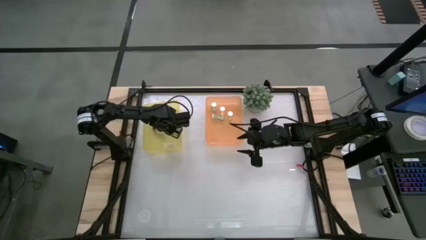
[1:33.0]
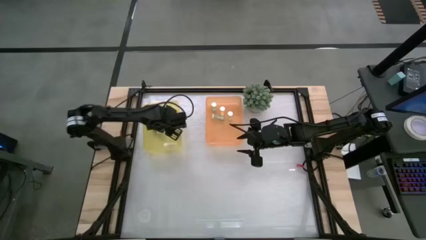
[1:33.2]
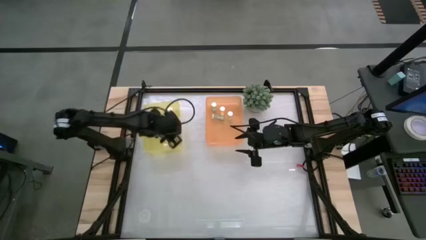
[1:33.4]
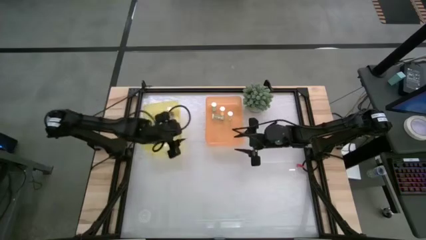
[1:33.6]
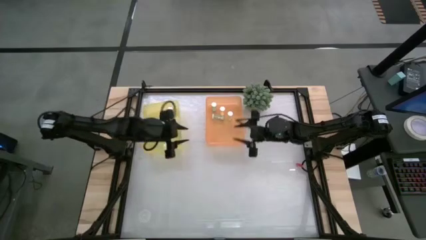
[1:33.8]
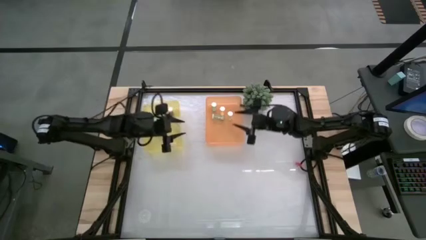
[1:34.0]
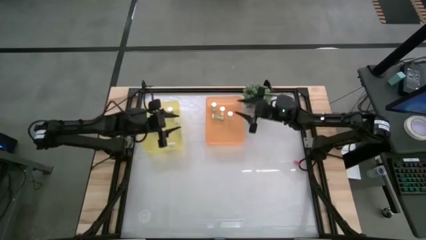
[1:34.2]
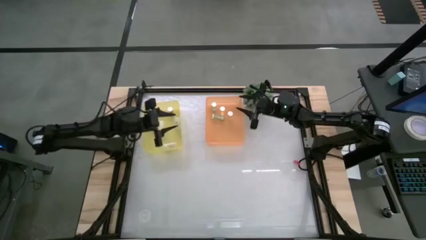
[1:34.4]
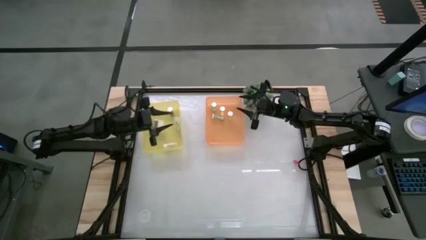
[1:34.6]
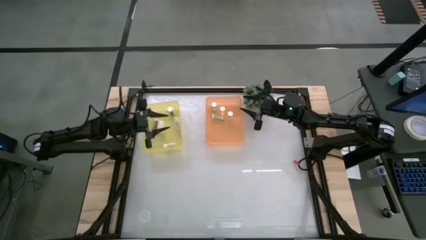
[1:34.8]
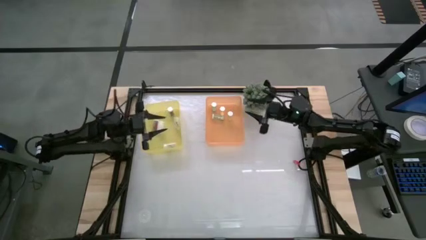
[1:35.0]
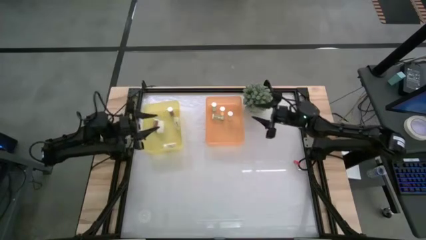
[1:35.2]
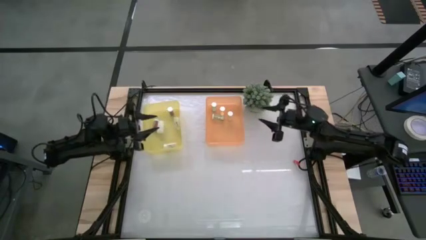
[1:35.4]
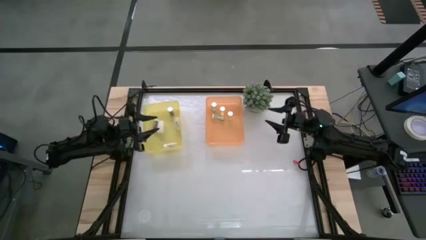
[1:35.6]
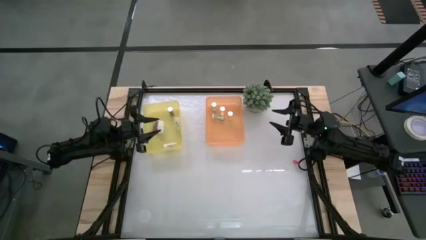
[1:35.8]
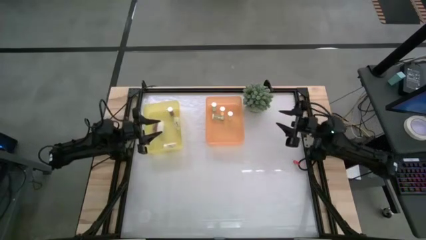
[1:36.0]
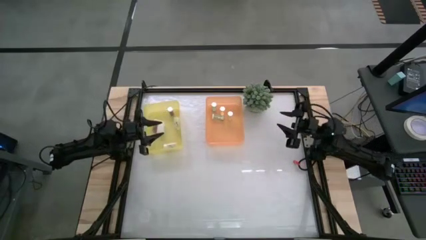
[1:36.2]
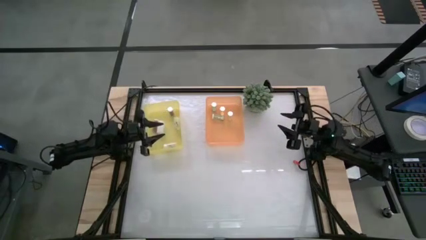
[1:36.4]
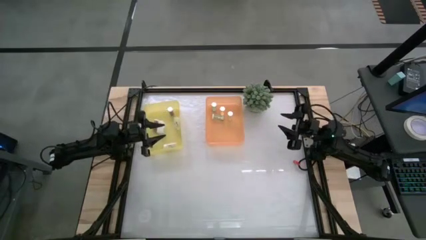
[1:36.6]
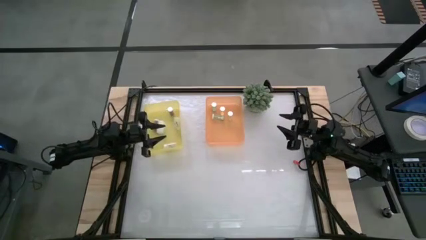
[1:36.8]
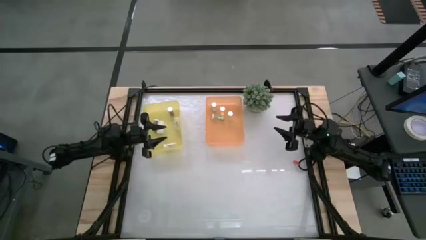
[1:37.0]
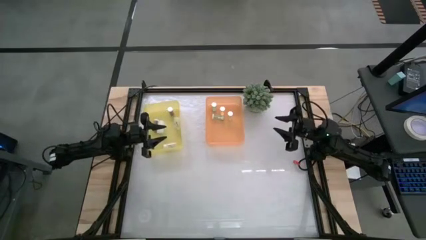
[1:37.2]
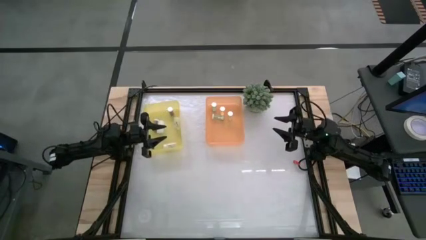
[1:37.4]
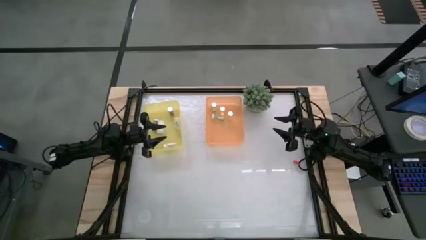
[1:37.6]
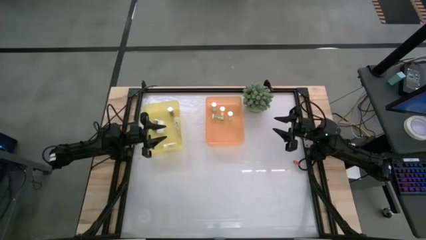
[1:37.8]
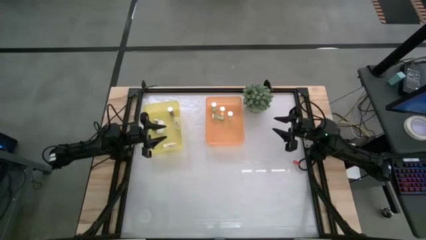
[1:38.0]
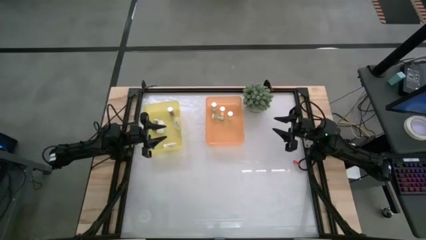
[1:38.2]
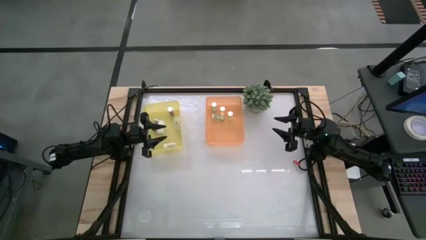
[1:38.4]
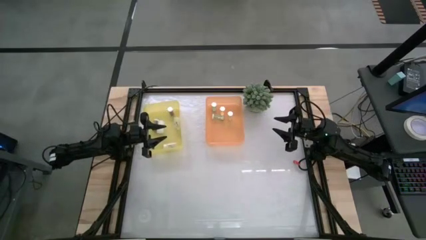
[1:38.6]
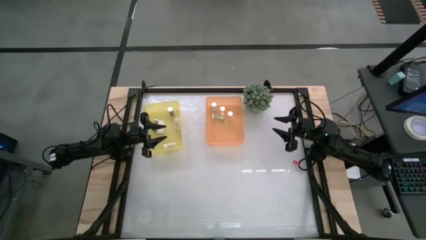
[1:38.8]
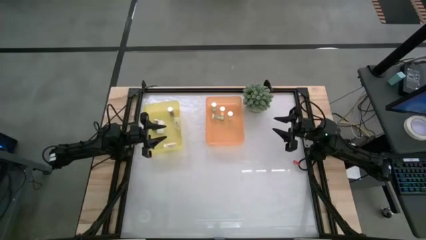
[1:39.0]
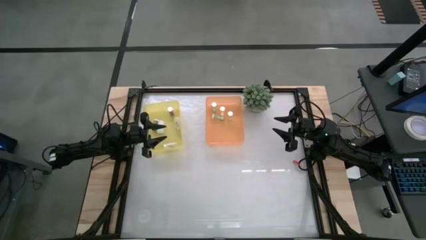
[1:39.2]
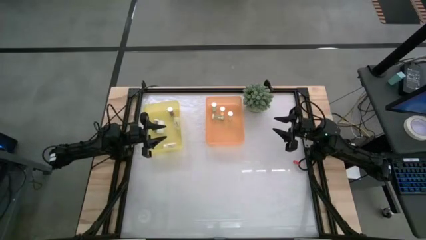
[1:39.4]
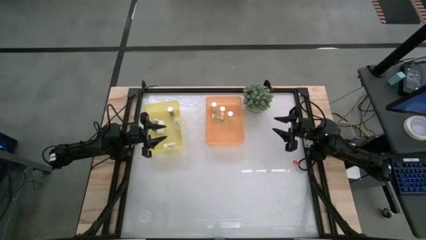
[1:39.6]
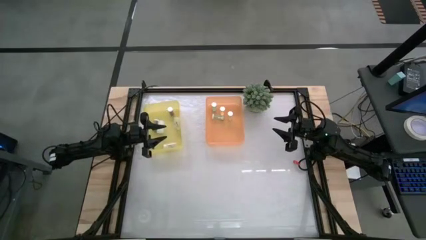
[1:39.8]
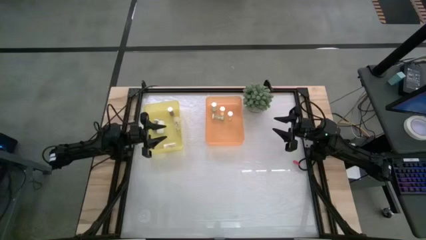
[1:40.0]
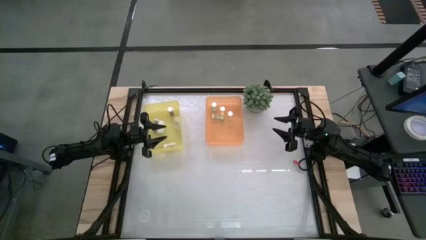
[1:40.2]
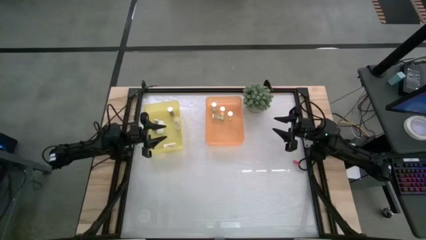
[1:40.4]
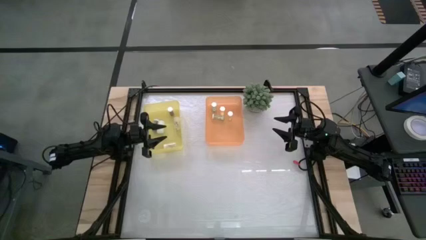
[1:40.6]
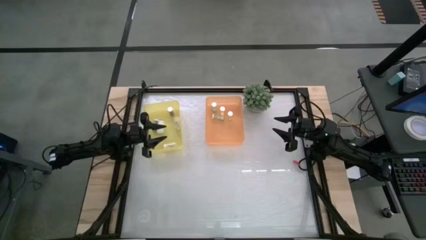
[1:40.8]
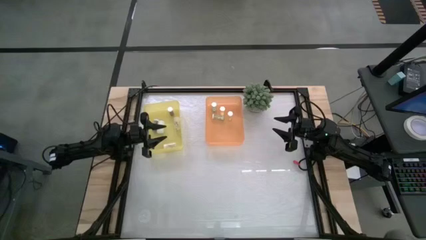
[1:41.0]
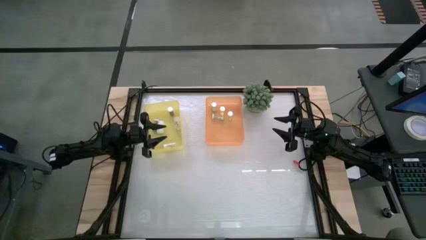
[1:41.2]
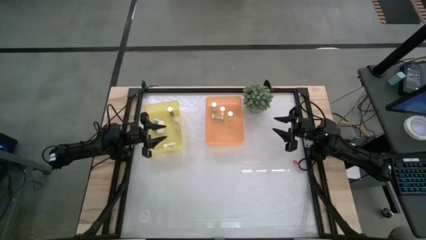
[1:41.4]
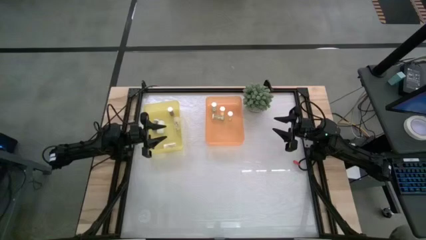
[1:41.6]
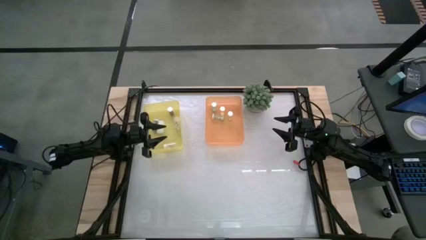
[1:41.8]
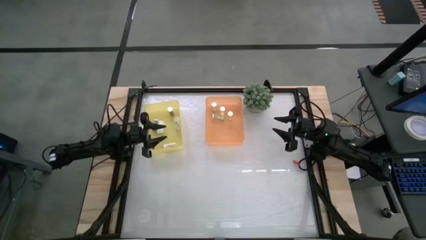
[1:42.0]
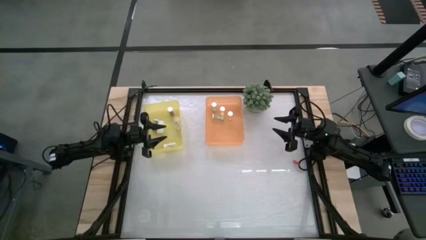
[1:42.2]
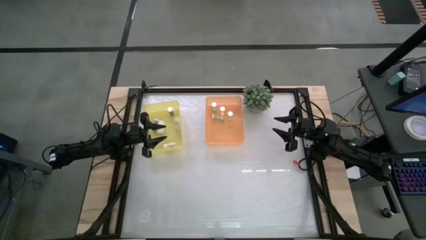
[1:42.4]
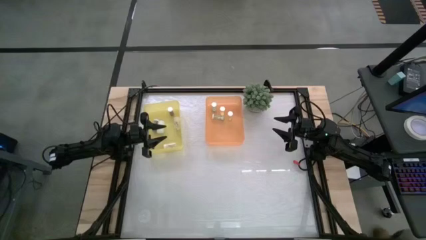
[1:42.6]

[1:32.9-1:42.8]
Task: Pick and place medicine bottles into bin by pill shape (circle, oval)
Return to Home Position

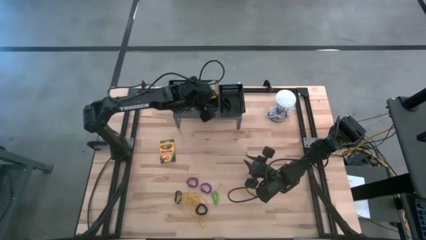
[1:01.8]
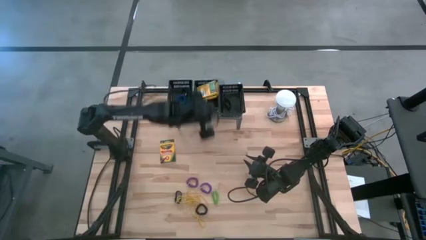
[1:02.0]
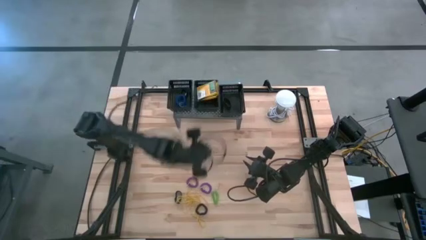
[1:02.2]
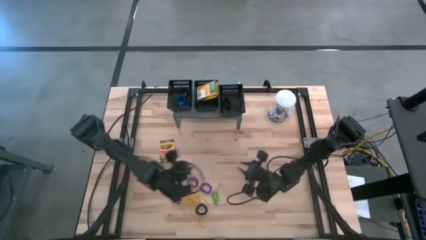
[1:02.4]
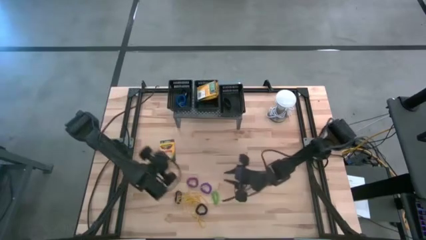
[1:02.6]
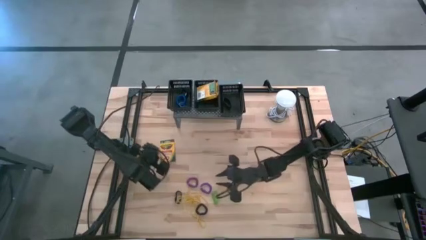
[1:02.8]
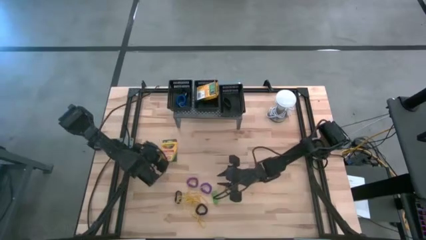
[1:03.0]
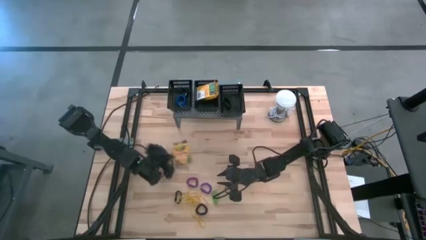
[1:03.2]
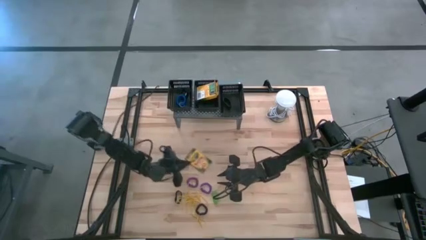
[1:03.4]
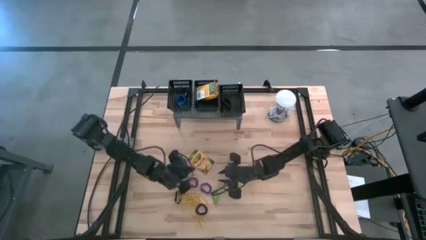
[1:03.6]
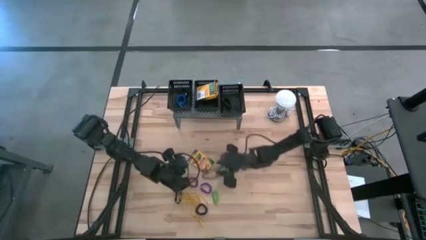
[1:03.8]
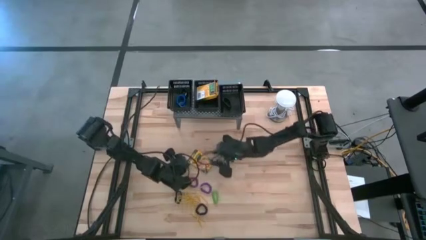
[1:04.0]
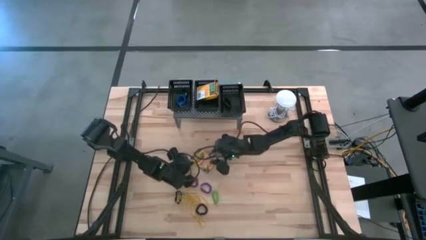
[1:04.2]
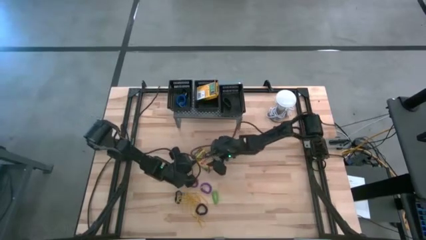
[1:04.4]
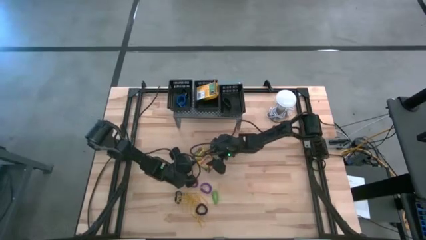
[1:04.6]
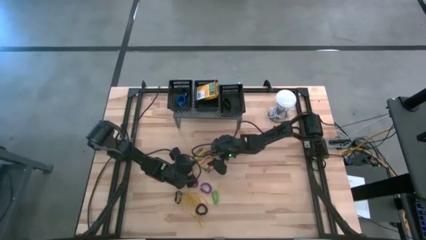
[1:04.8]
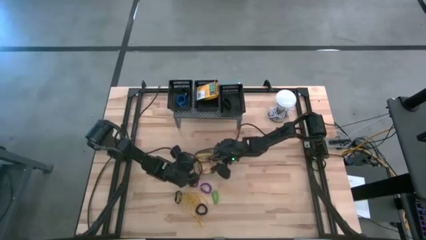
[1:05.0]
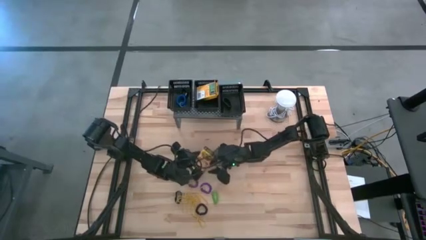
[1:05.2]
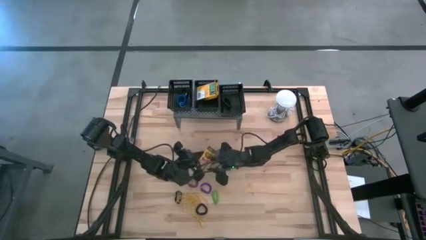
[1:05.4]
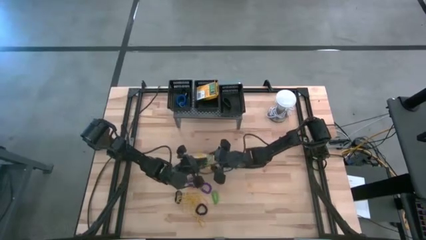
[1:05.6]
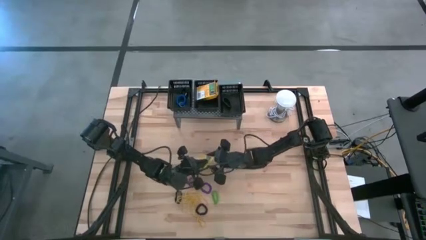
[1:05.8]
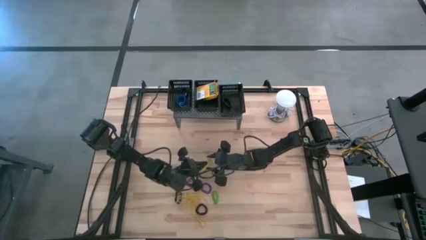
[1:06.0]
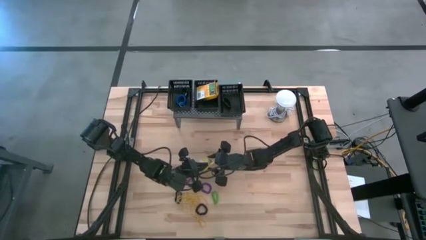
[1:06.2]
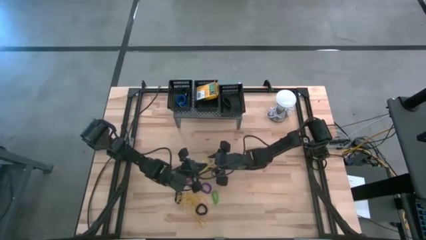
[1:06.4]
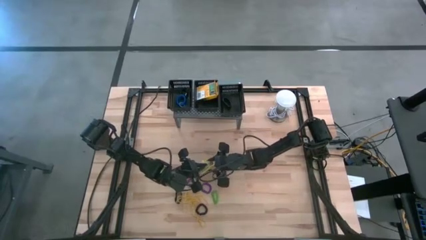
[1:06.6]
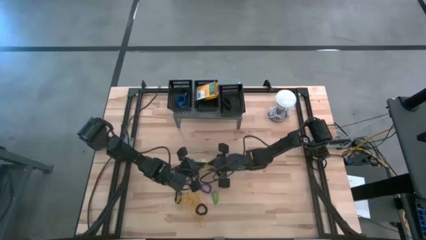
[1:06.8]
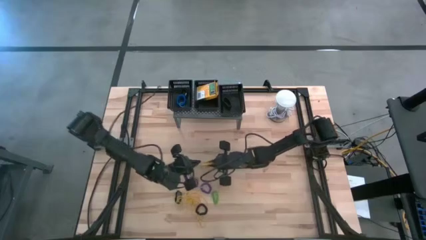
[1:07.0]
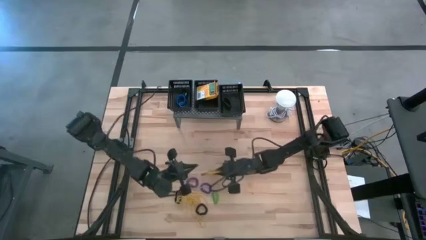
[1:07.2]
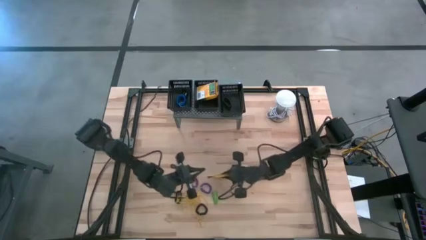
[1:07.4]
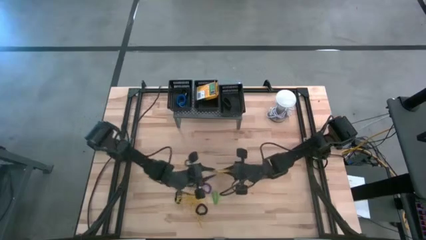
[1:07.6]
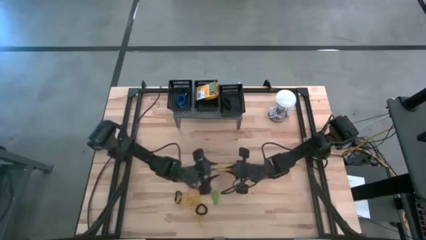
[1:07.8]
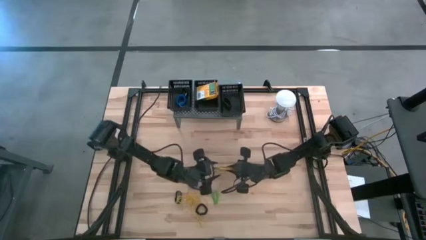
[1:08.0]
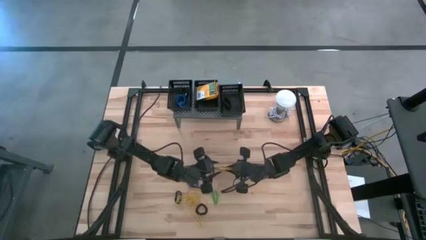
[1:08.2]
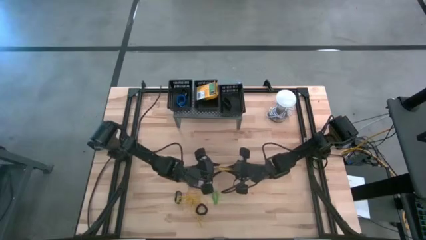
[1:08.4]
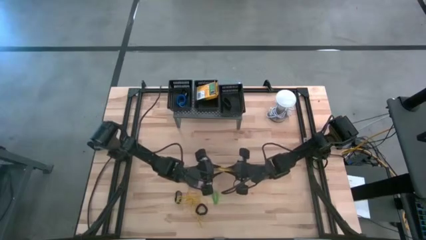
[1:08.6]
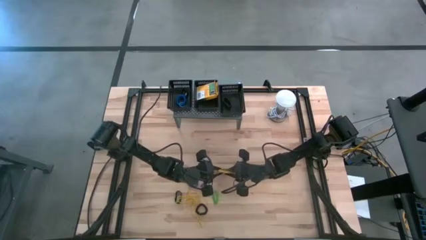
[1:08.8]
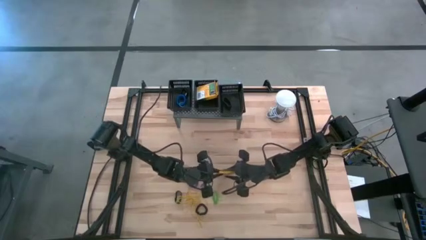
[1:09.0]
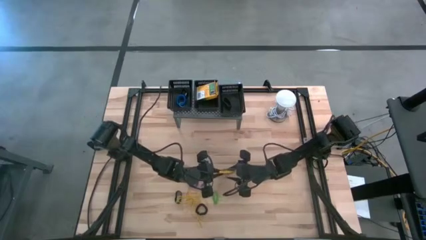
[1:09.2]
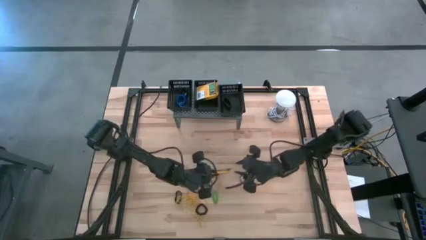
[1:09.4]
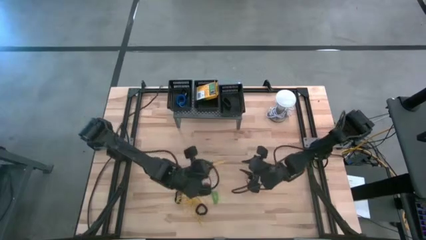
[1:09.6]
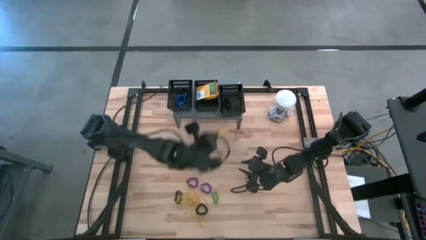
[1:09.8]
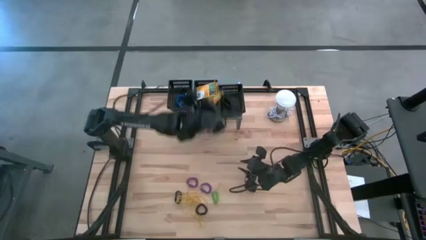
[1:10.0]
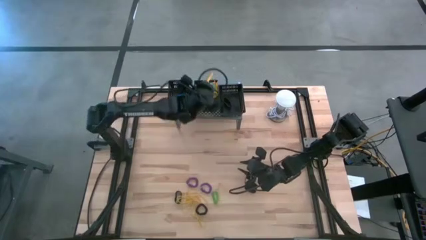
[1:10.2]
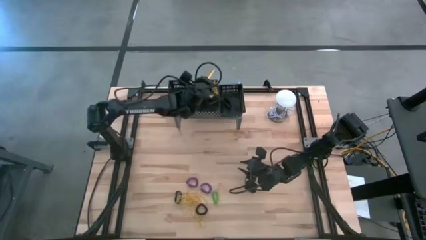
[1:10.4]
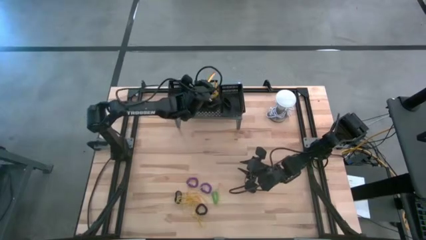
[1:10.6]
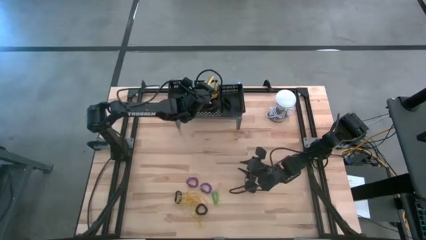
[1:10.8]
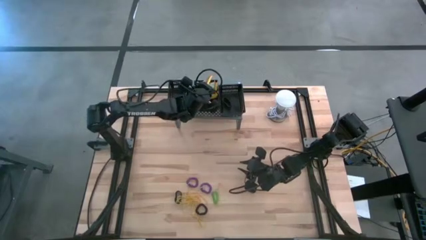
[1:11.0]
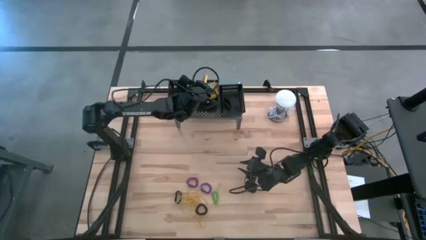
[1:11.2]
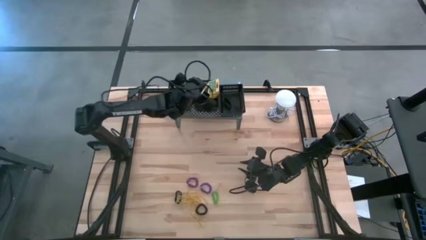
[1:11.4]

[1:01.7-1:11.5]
Task: Pick & Place Office Desk Supplies
Put the yellow crayon box into the middle black bin on the shelf
